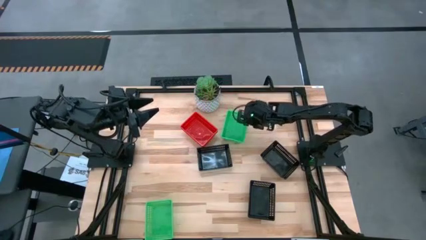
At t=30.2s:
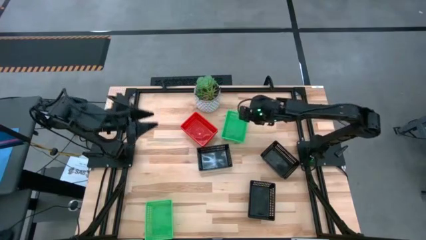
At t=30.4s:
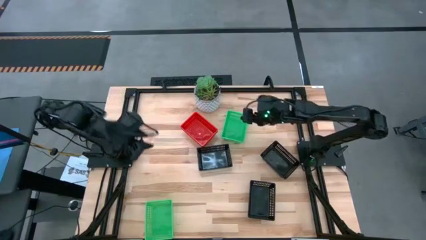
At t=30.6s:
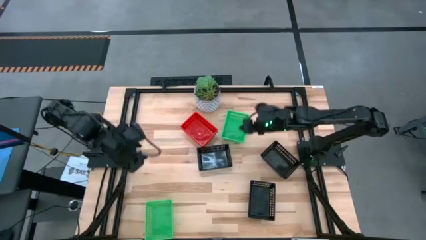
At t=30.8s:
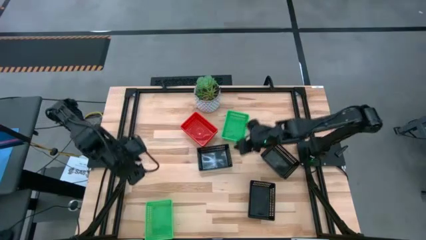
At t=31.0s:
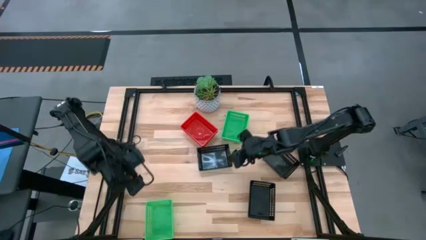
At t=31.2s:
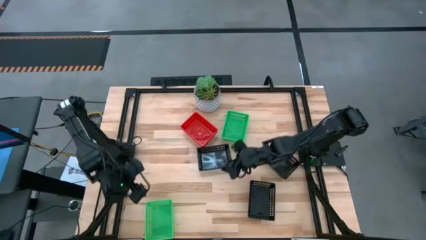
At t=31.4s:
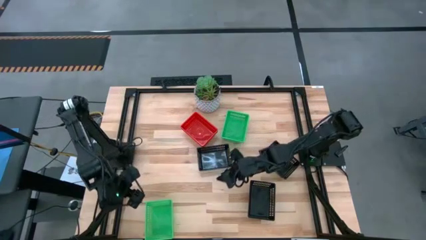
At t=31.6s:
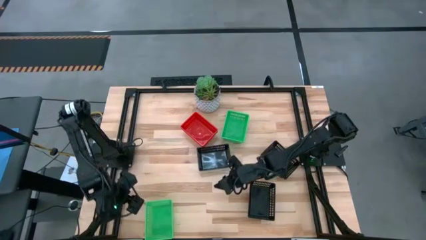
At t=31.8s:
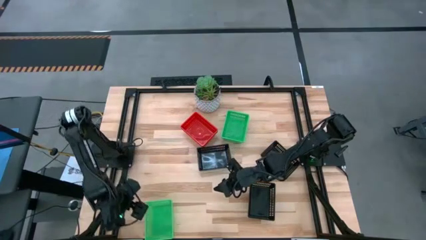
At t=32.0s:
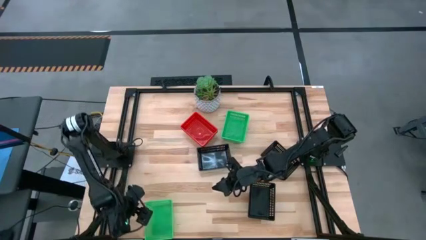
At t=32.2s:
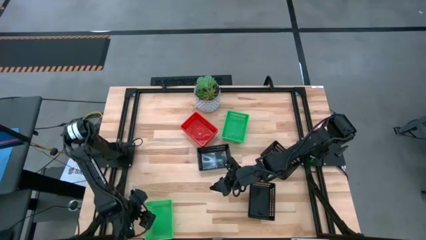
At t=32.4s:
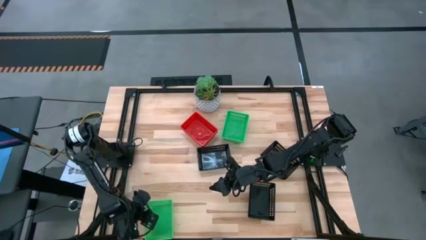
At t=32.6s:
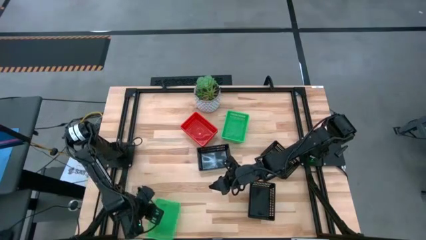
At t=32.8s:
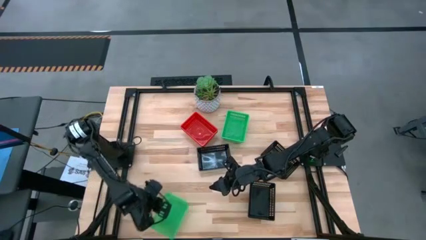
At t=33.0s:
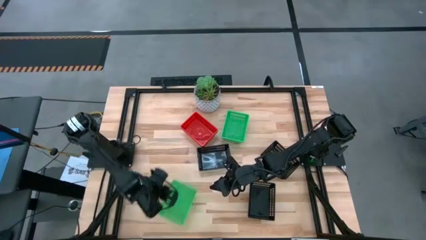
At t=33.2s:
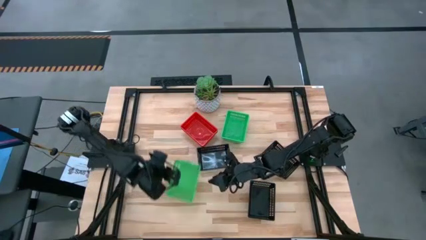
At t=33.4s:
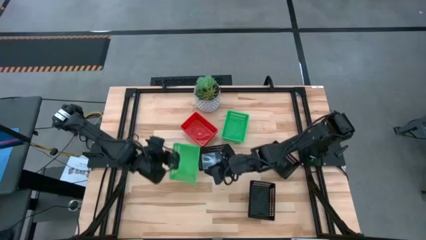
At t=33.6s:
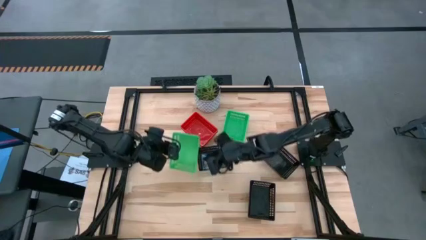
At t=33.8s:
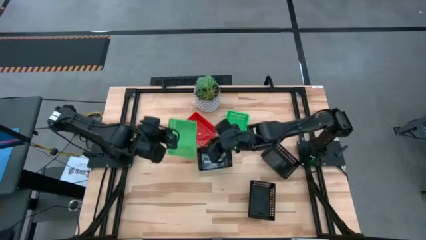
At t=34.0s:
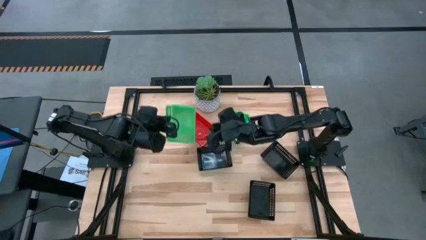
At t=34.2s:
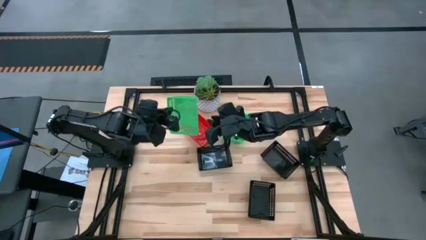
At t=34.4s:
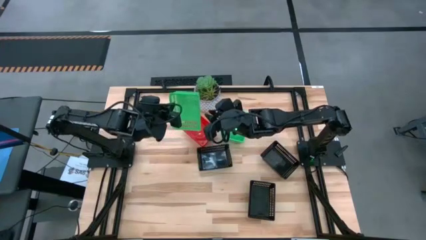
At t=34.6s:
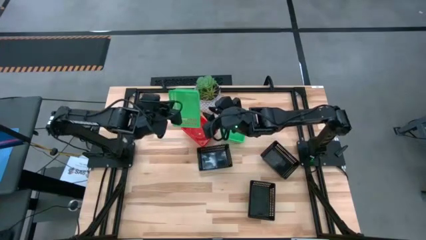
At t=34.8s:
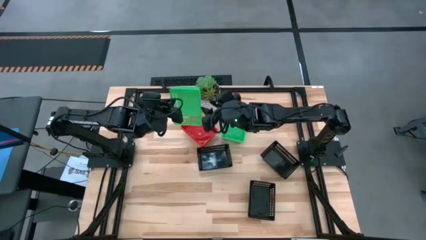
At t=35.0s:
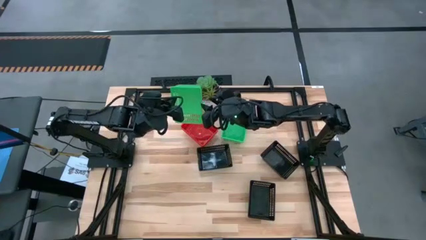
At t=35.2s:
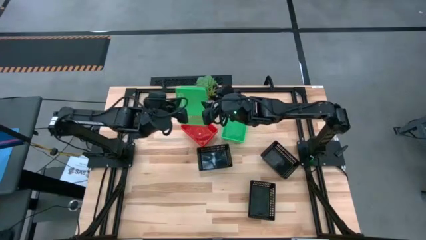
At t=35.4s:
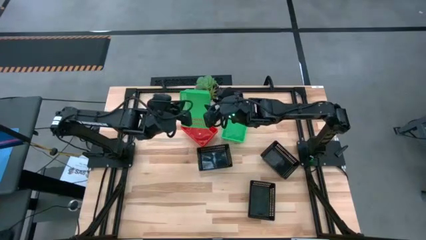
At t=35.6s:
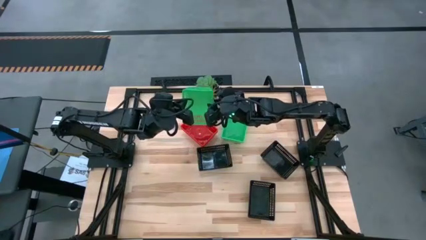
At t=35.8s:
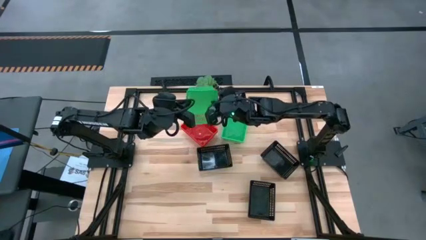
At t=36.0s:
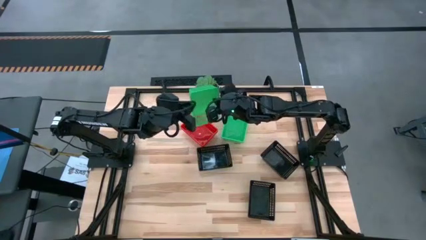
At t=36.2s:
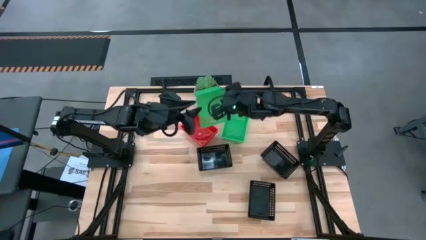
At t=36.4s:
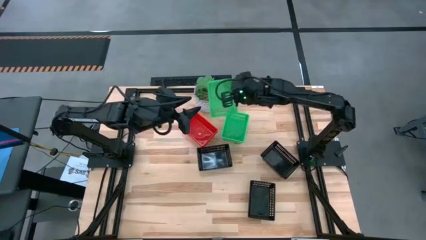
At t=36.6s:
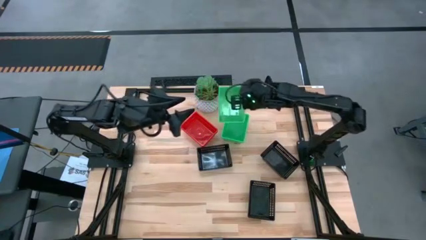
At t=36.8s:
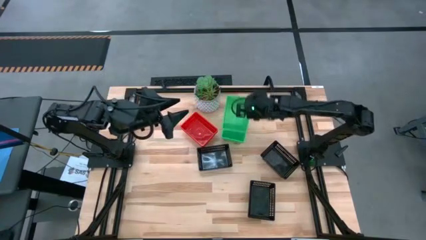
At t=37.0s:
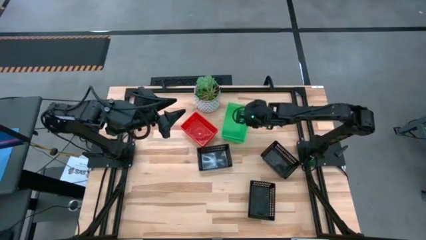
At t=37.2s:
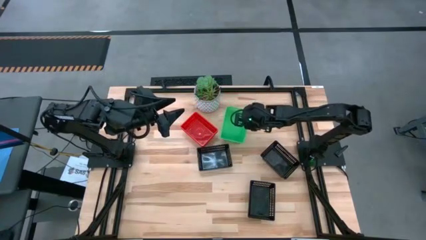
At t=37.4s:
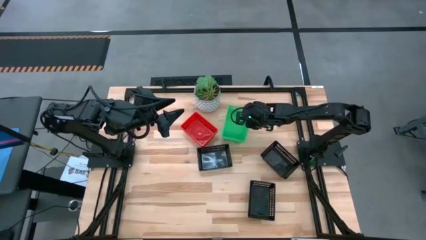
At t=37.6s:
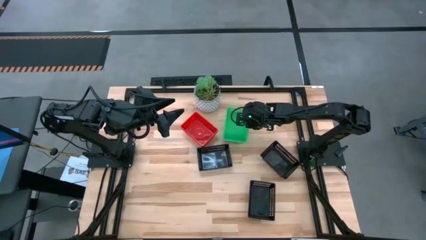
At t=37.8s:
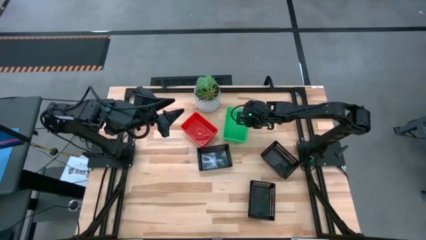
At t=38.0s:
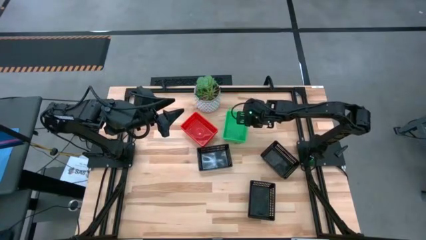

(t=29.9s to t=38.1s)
Stack the bottom green bin on the top green bin

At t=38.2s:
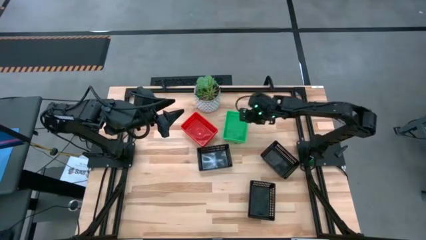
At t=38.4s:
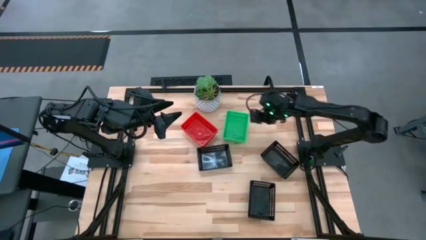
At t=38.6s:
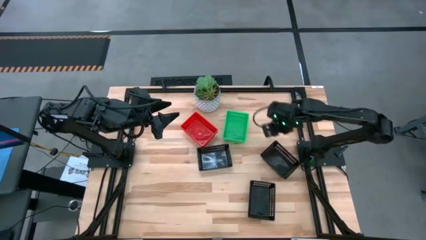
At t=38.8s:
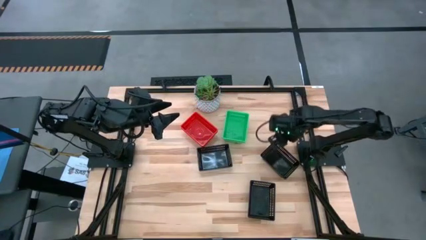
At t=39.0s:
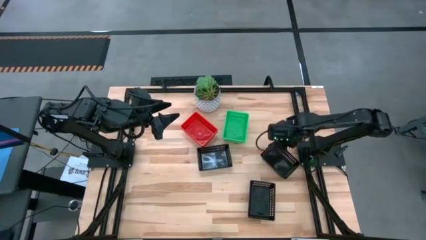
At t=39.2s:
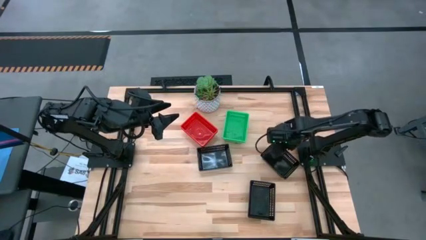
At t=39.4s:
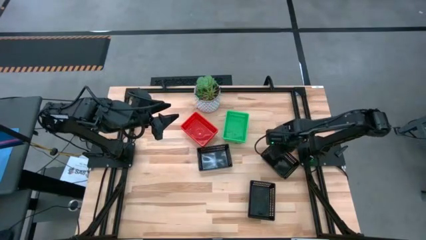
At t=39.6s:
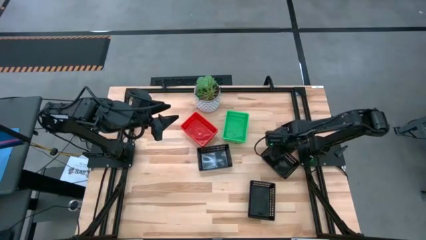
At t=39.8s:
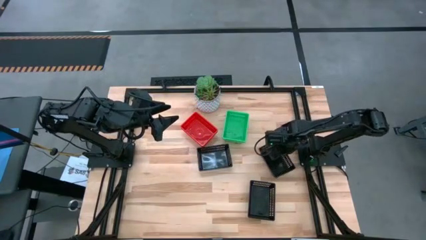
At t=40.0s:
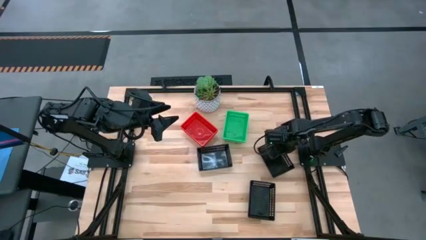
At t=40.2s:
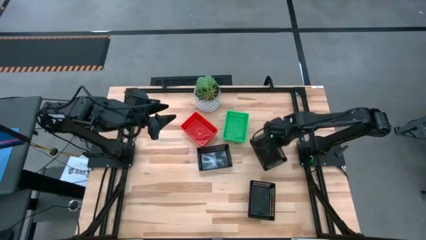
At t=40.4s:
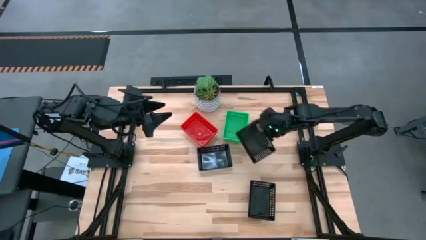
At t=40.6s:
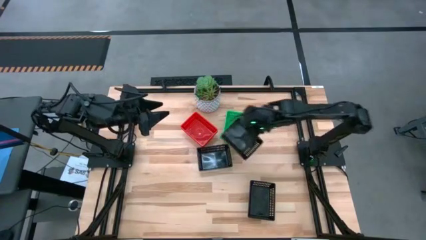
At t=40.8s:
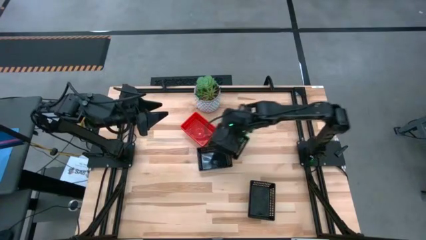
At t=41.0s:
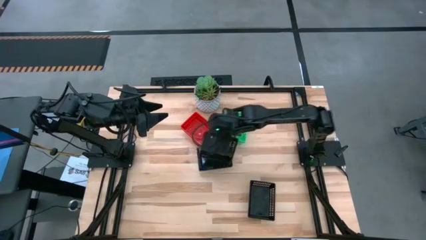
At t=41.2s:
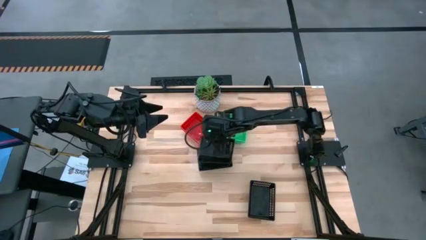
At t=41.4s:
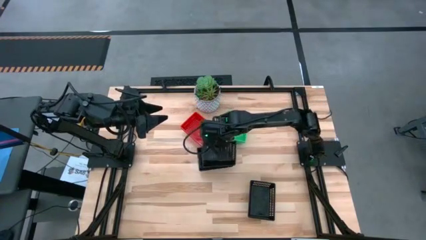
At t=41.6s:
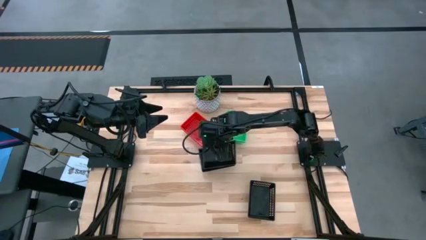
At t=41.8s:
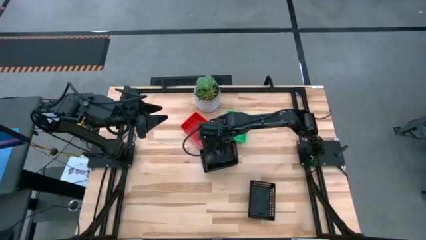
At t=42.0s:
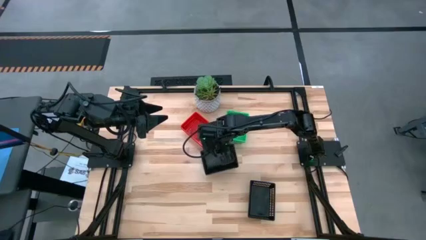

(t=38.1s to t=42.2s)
Stack the top right black bin on the top left black bin

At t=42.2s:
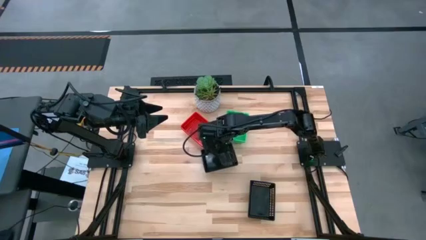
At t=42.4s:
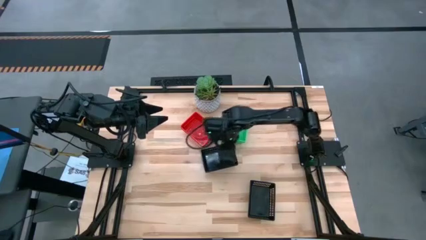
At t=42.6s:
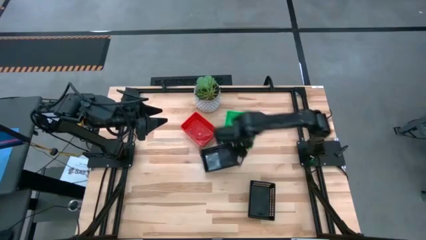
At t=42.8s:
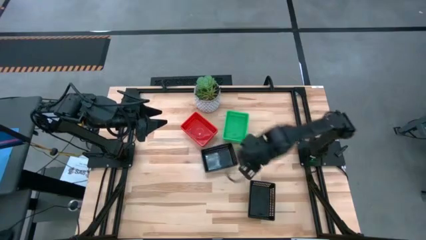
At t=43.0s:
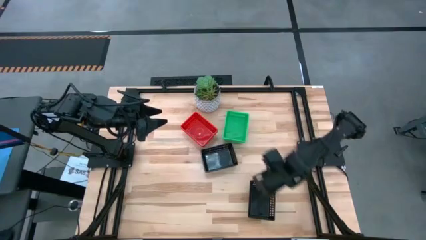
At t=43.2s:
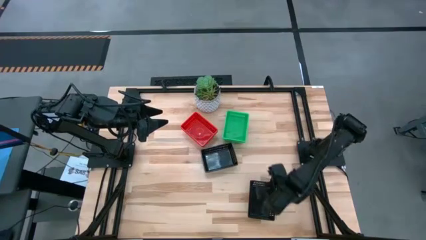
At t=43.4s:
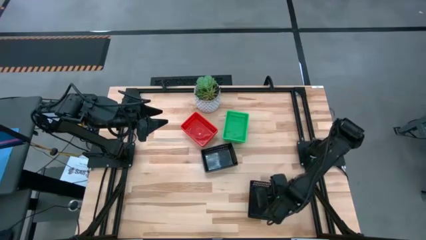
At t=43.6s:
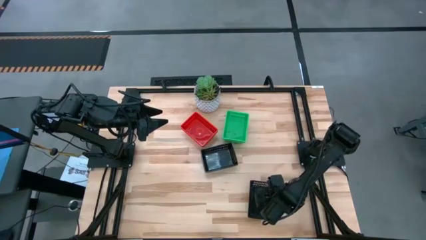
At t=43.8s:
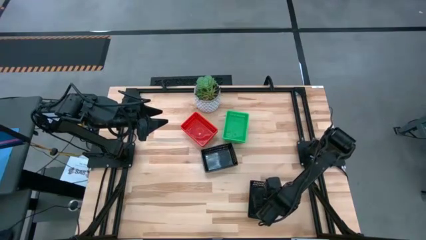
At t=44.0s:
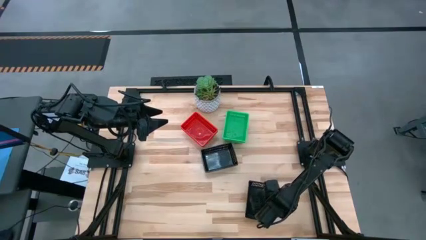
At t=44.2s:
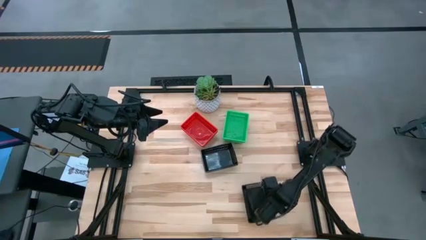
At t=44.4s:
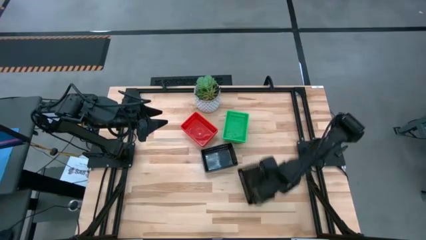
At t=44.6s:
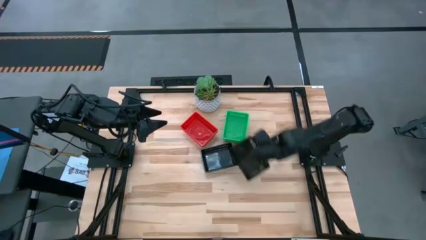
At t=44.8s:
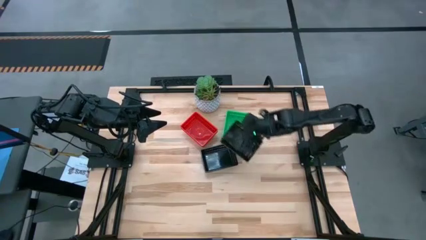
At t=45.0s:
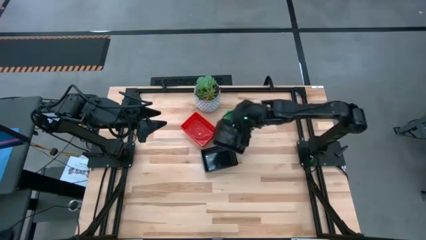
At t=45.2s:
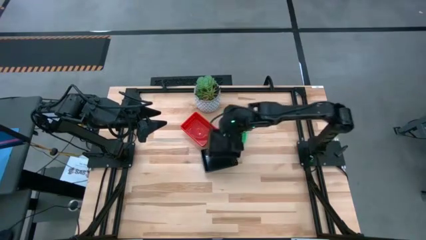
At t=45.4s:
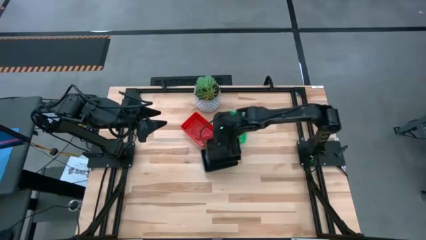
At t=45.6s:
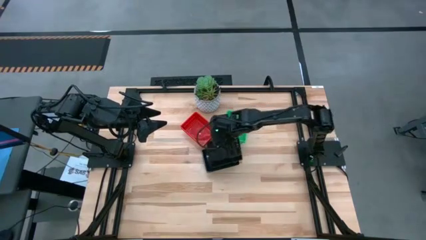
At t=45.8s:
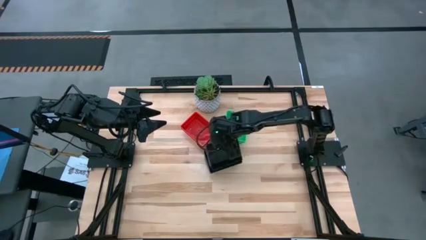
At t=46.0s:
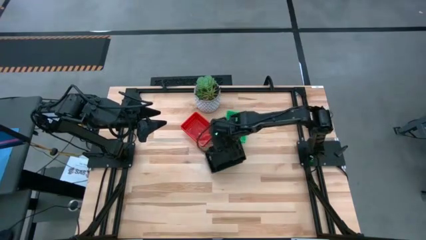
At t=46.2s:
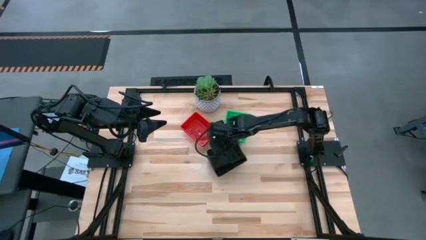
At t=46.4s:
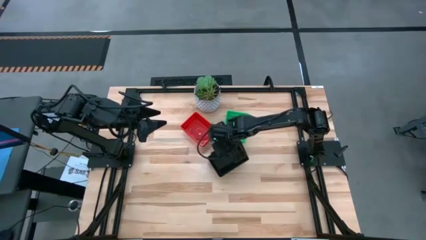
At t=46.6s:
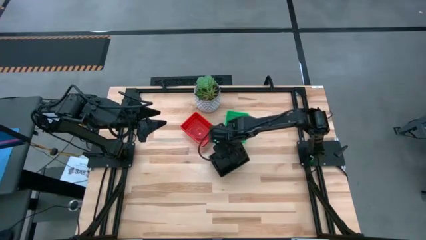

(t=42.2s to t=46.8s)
Stack the bottom black bin on the top black bin
